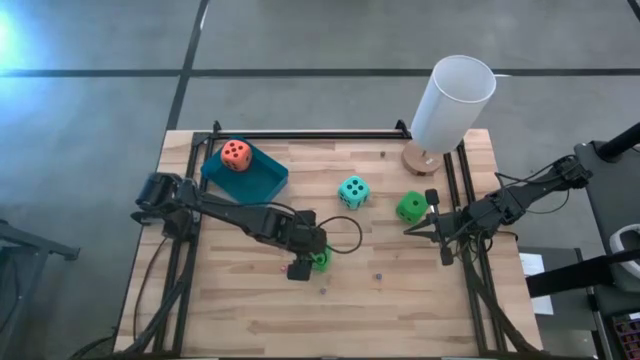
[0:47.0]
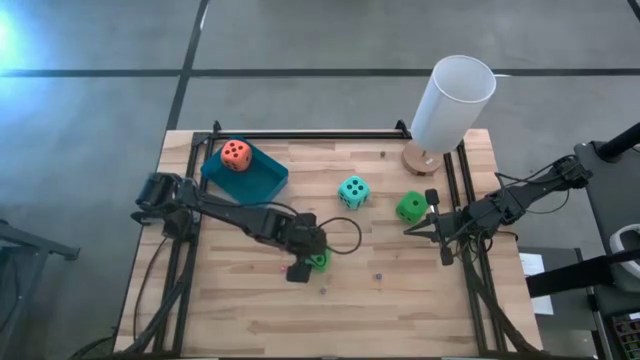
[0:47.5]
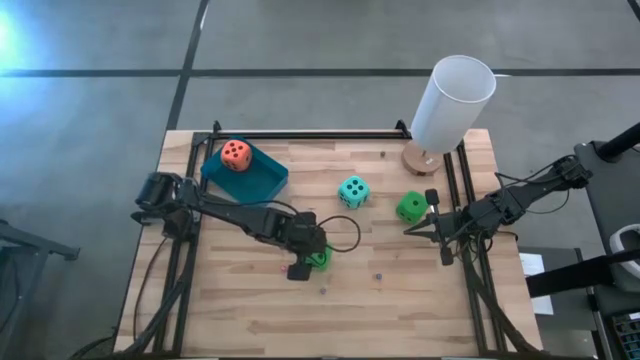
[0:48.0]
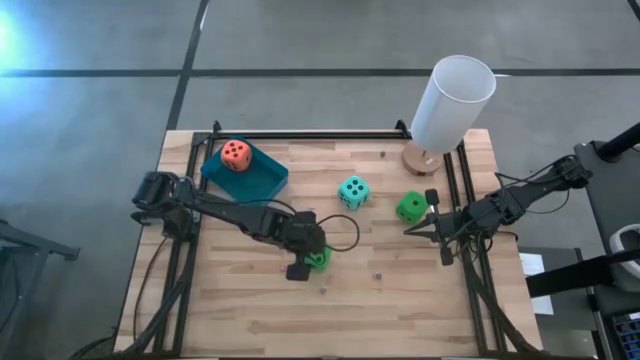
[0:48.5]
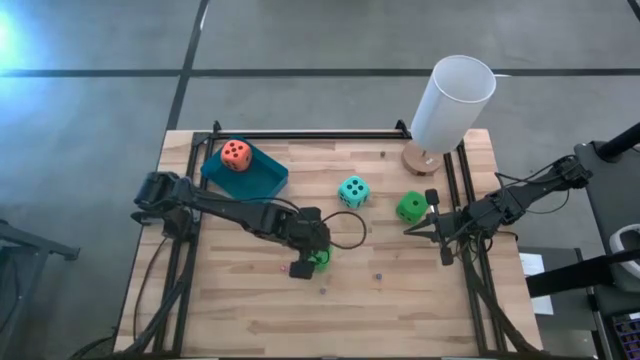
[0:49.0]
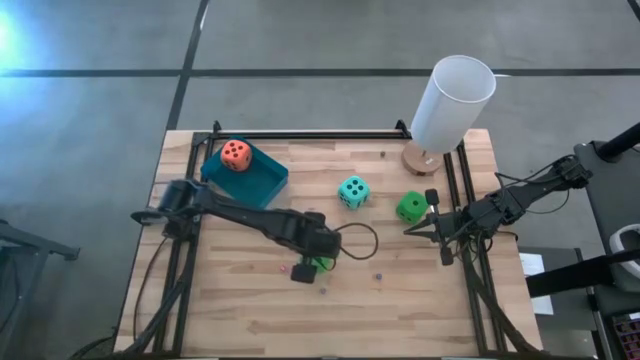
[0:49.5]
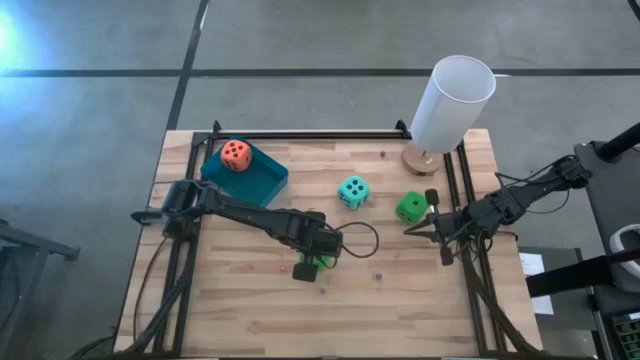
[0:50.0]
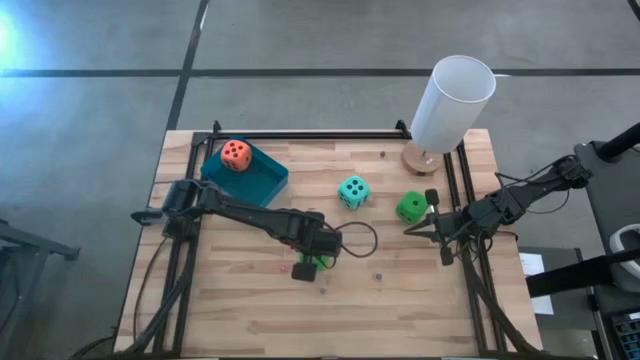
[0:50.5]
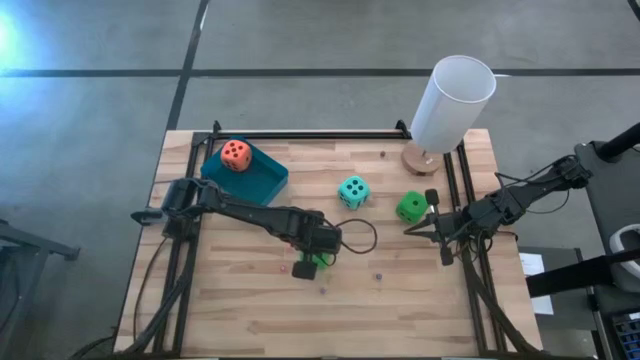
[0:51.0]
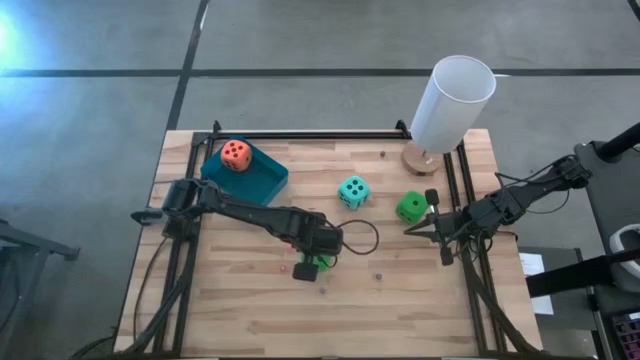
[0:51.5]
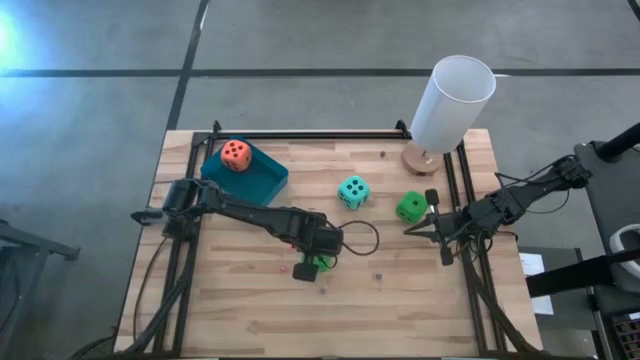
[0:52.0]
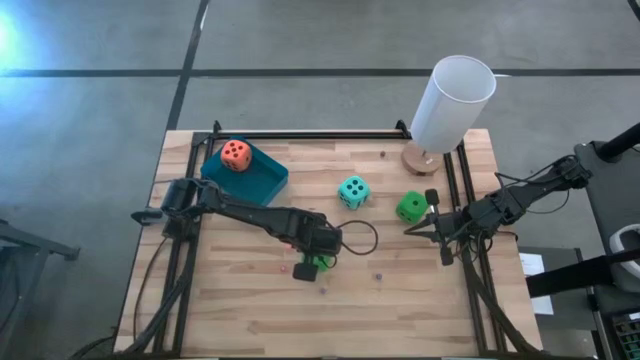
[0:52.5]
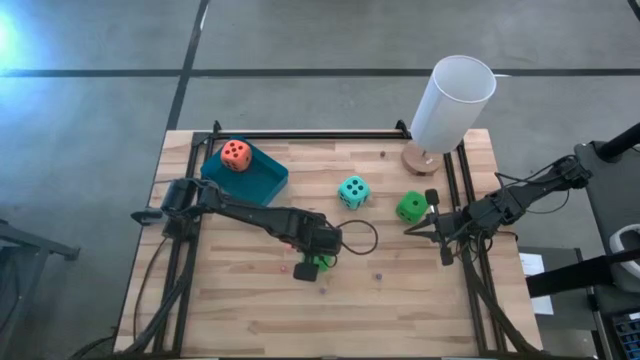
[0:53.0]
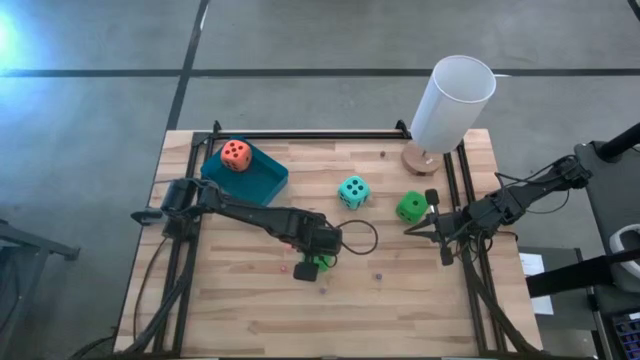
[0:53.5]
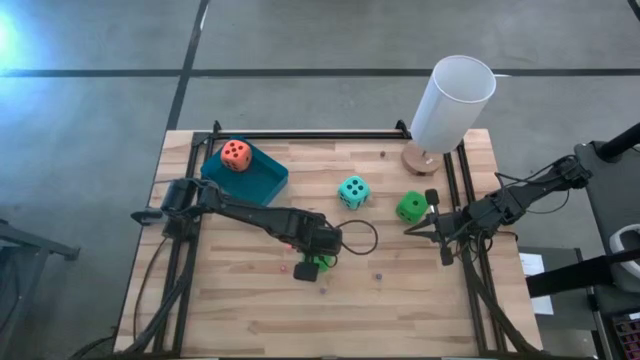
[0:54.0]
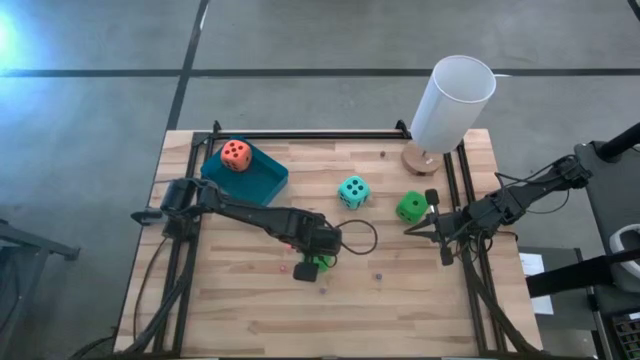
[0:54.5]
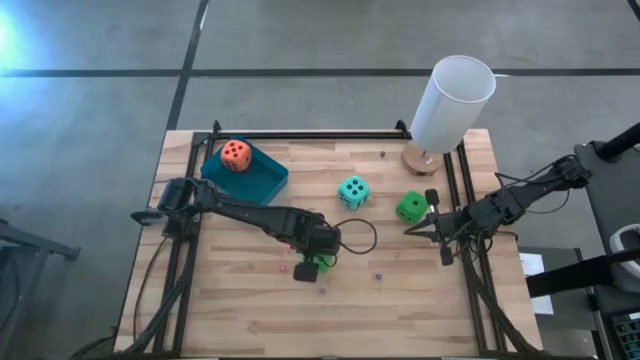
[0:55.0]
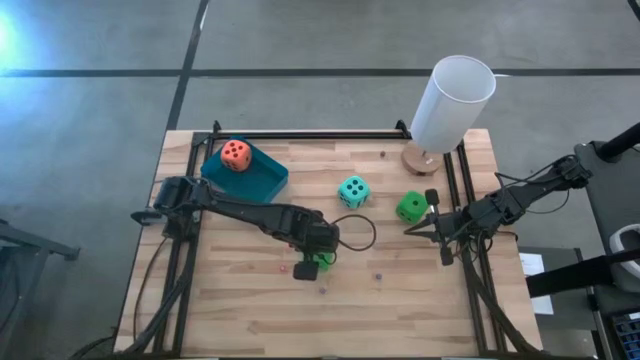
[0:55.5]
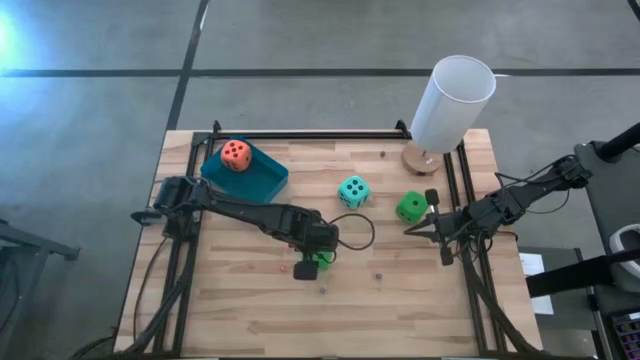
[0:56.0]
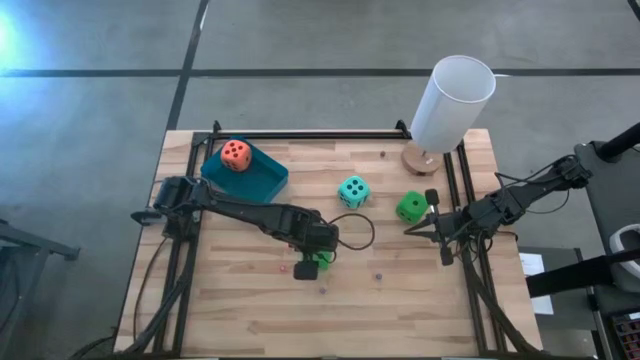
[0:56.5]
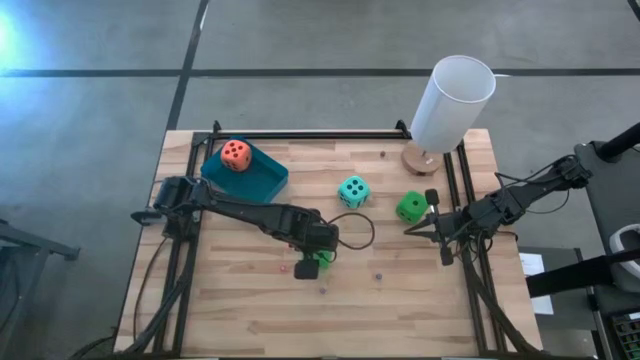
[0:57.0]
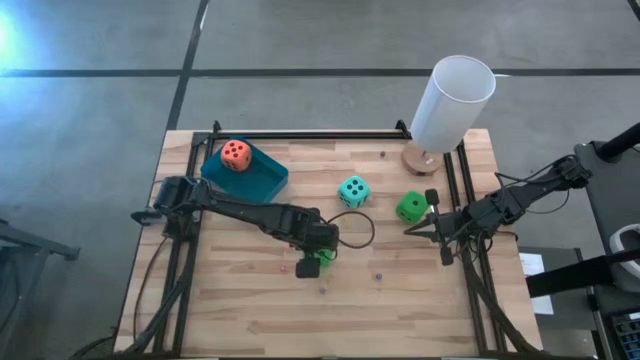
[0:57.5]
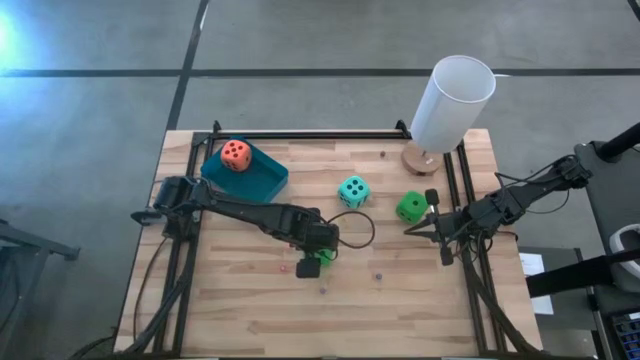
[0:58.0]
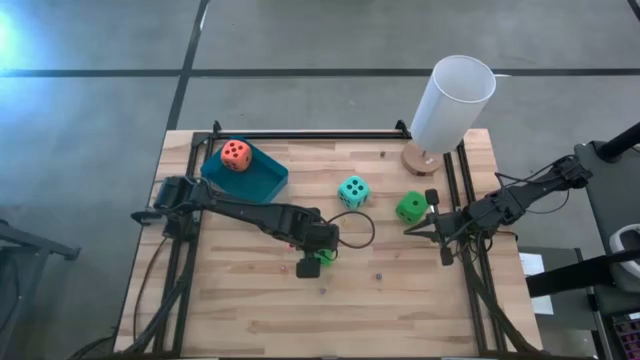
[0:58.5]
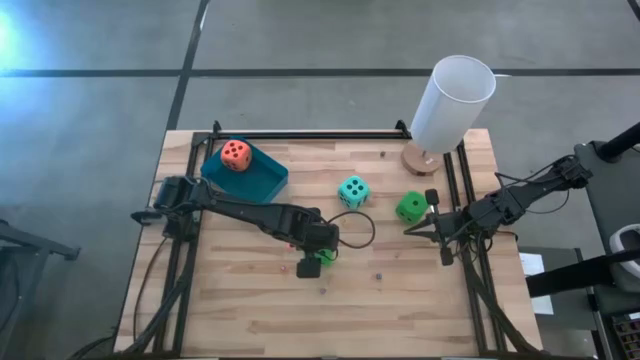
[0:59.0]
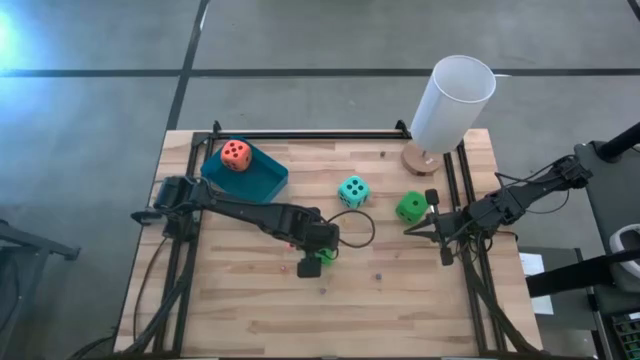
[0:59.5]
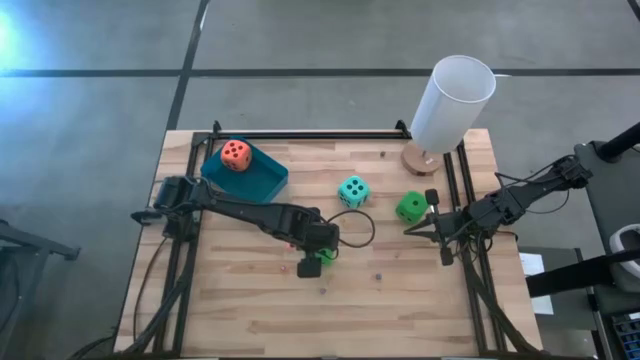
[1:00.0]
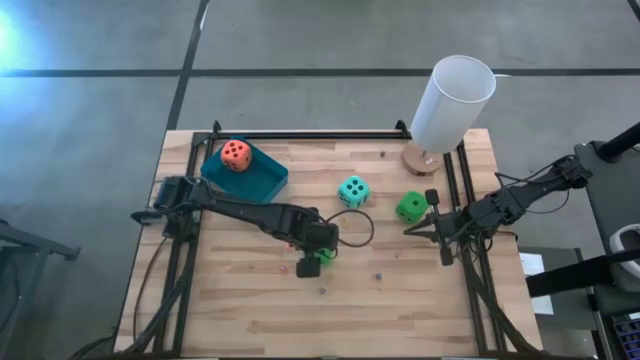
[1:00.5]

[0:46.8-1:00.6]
Task: Pick & Place Dice
Put the big green dice on the left into the blue bin

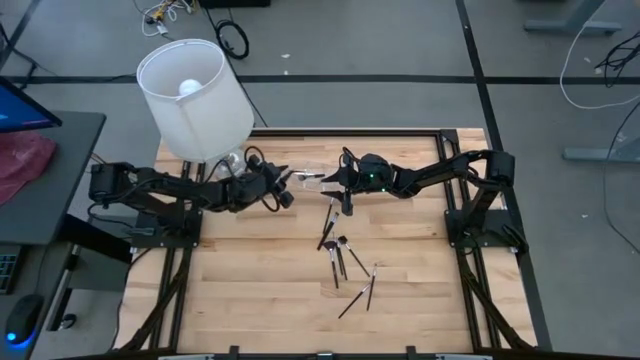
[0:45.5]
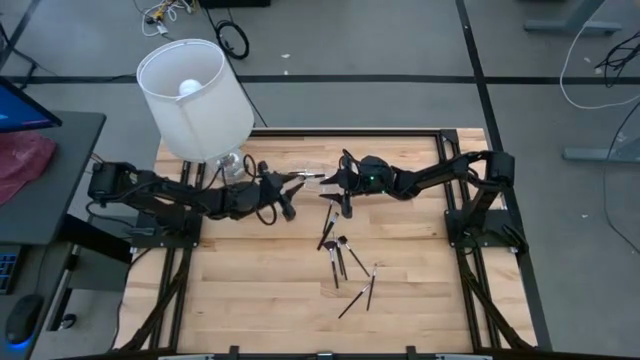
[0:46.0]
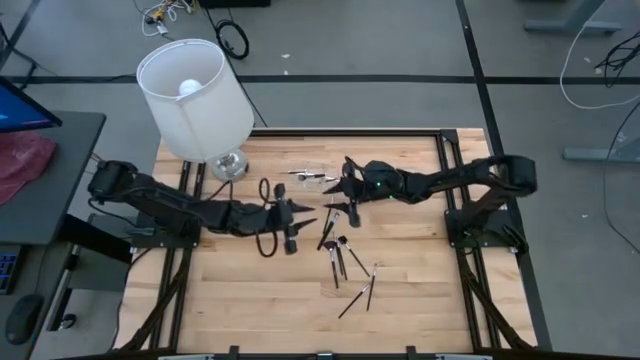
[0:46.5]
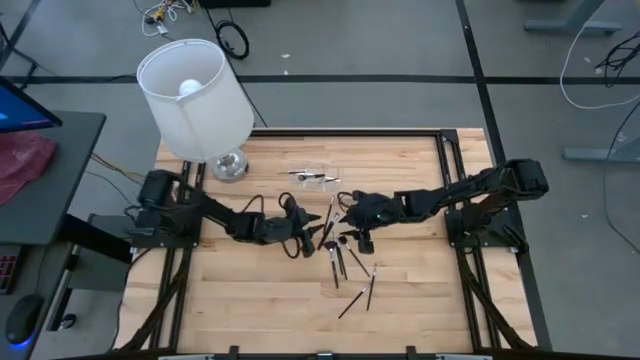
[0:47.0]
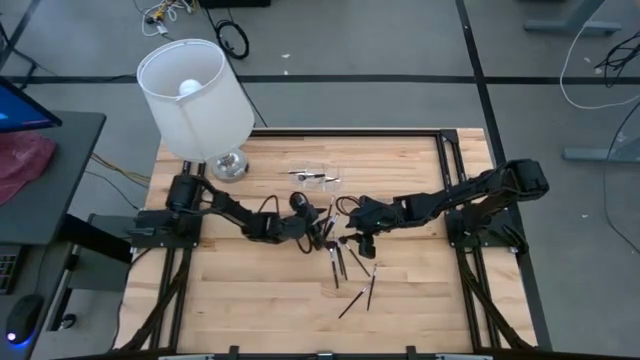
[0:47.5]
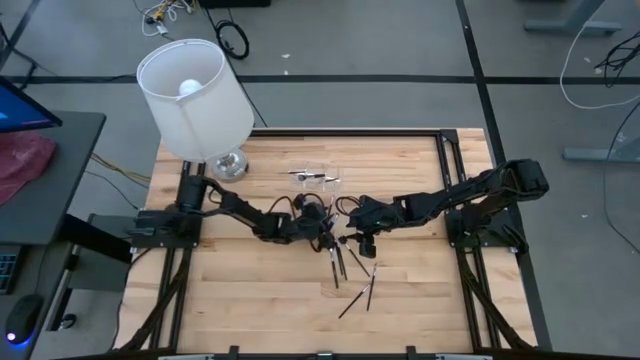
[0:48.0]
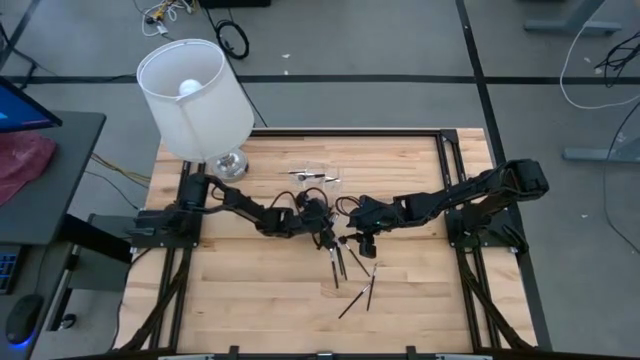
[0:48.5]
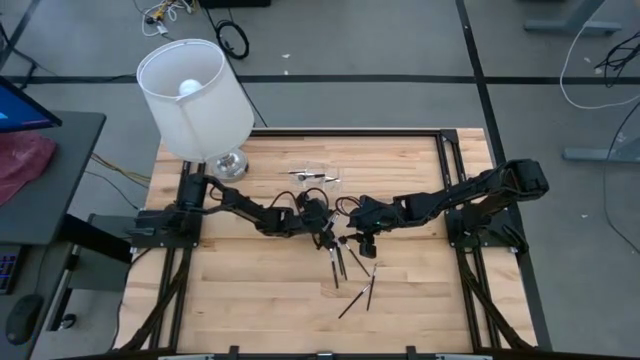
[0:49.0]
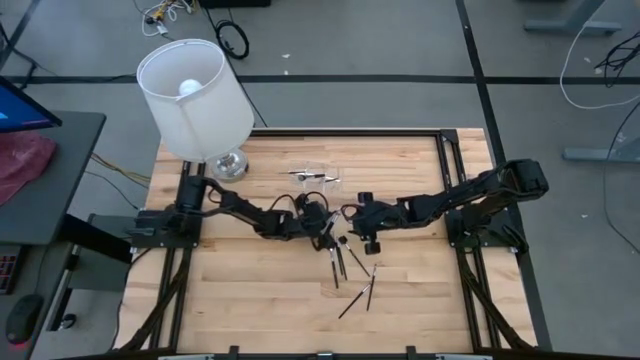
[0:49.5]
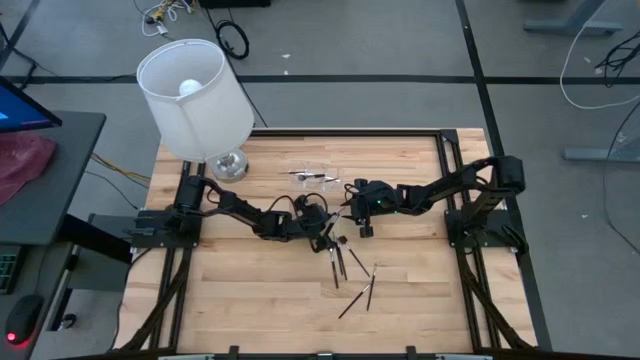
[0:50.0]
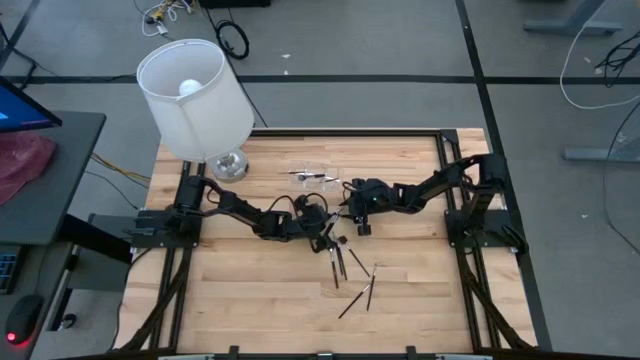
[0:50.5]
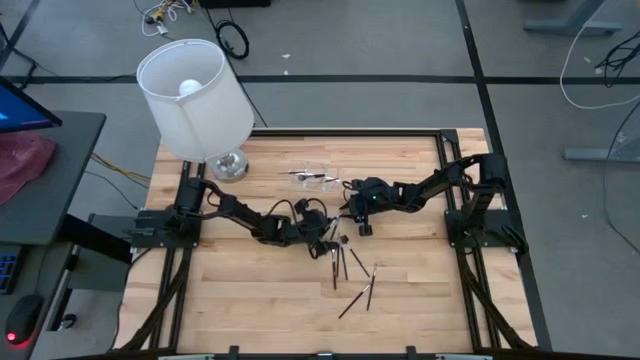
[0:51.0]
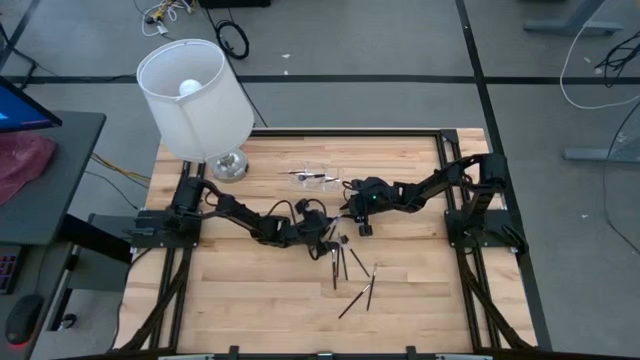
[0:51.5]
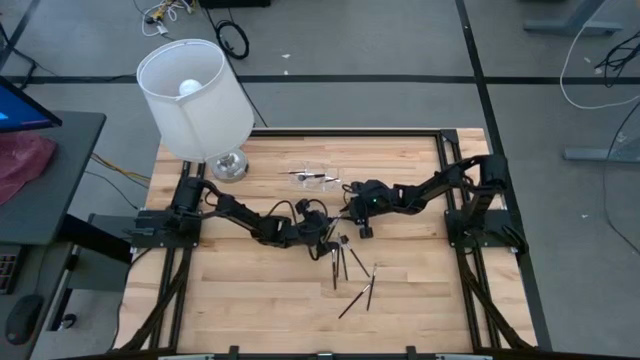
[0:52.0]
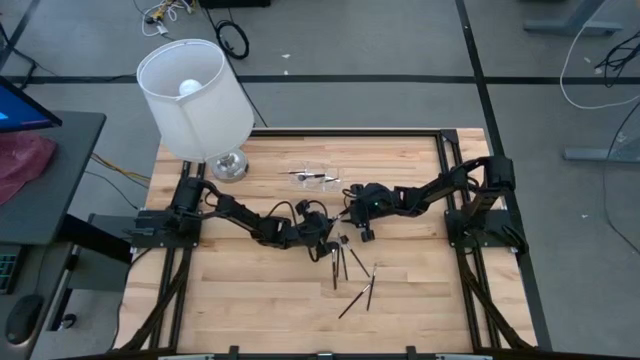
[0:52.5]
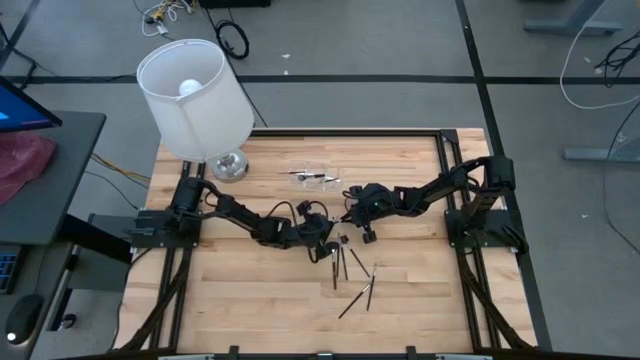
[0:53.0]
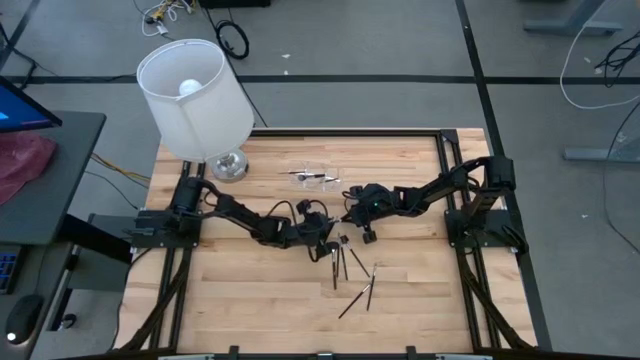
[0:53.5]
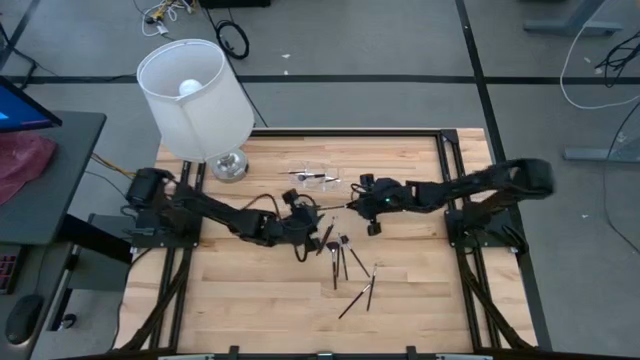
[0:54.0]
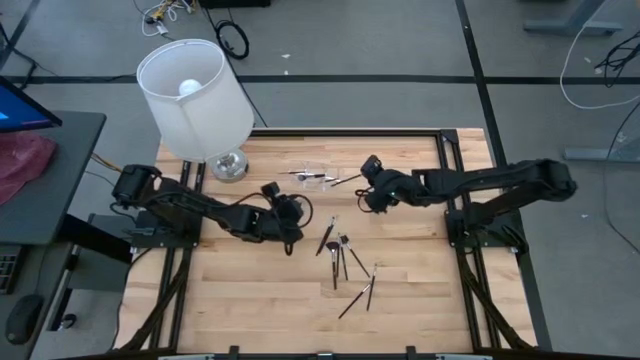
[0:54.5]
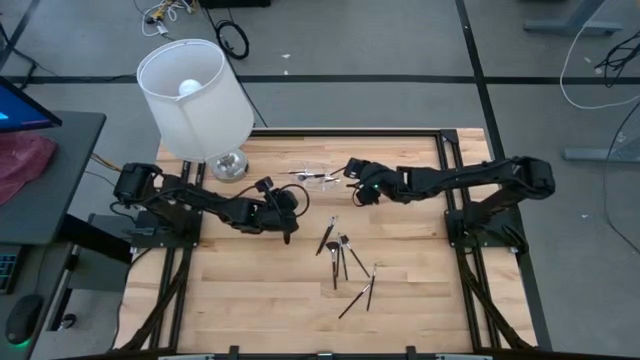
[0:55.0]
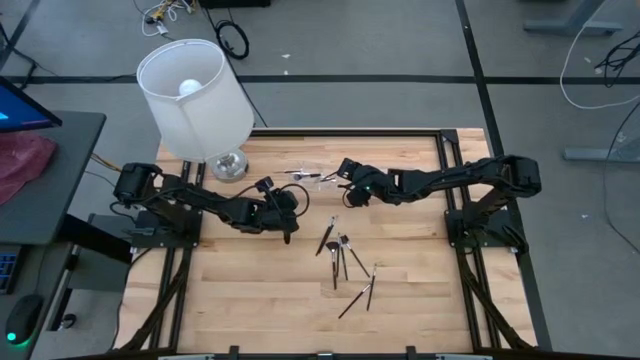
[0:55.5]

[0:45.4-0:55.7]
Task: Put items in baskets/containers
Put the black eyeliner brush into the transparent organizer
